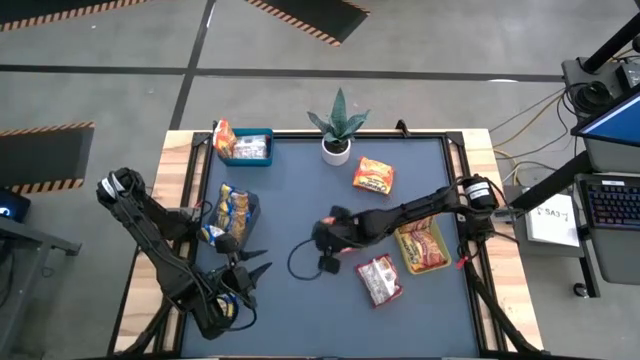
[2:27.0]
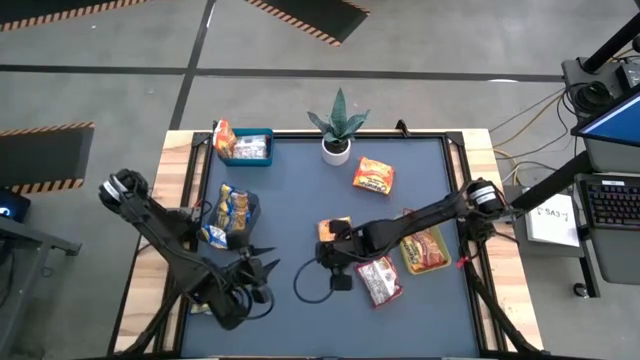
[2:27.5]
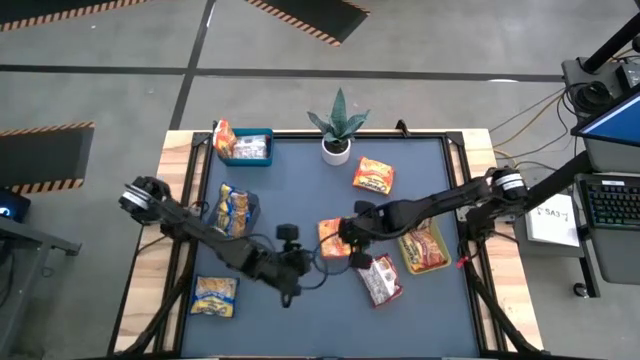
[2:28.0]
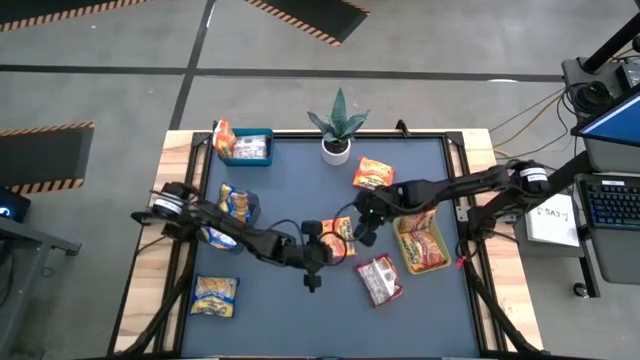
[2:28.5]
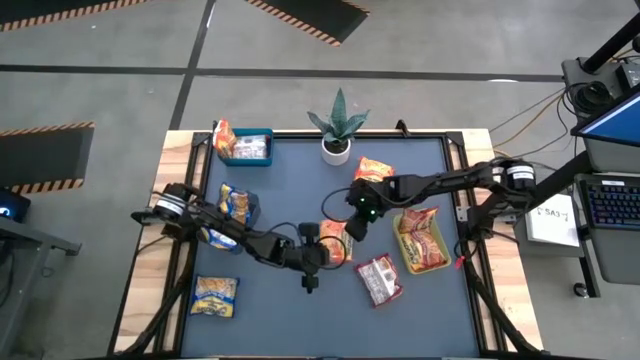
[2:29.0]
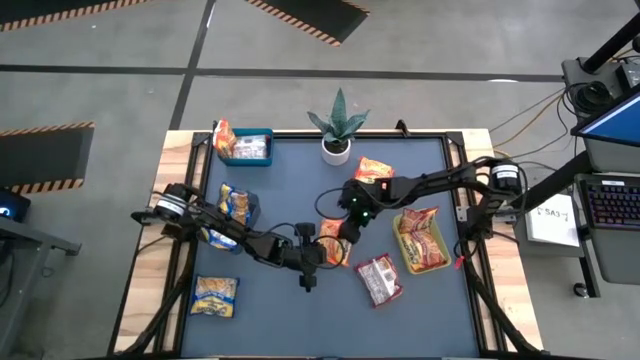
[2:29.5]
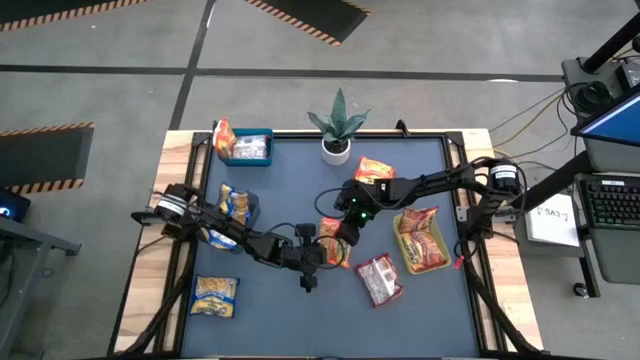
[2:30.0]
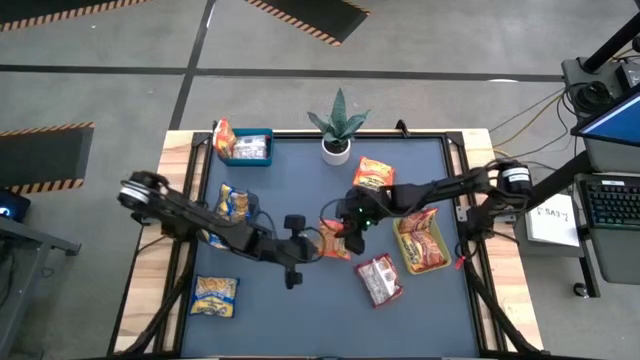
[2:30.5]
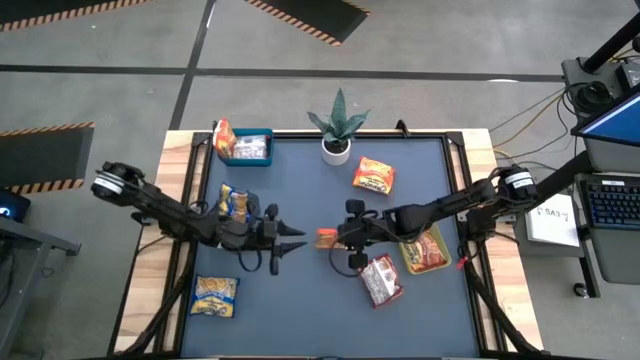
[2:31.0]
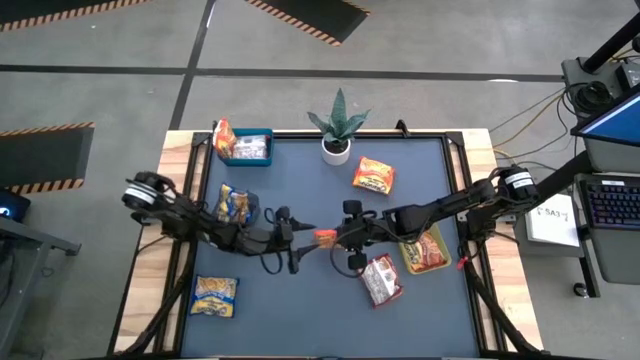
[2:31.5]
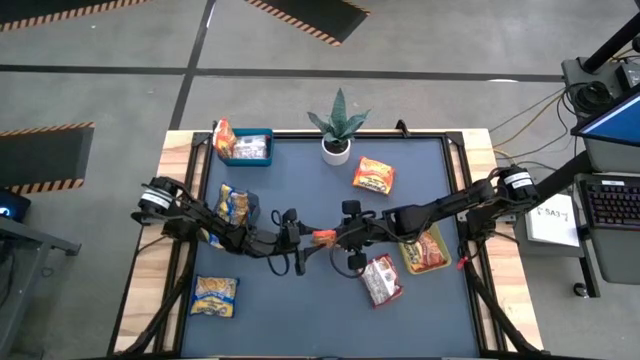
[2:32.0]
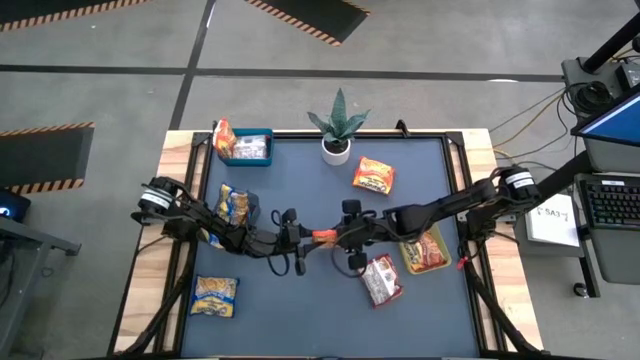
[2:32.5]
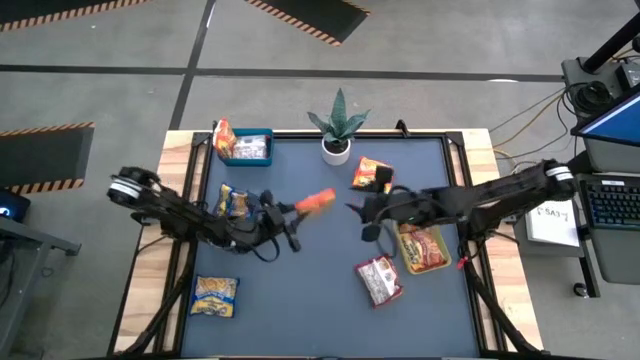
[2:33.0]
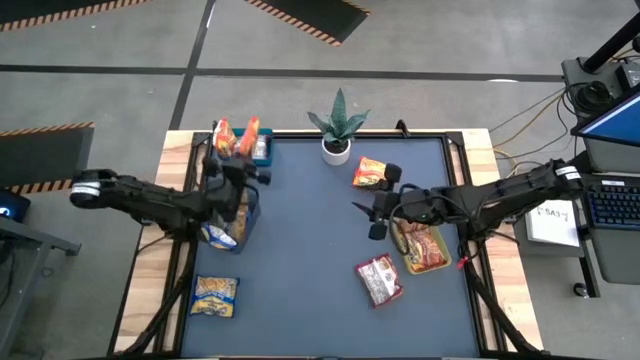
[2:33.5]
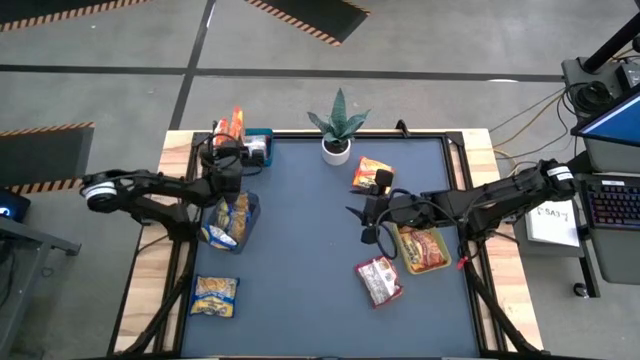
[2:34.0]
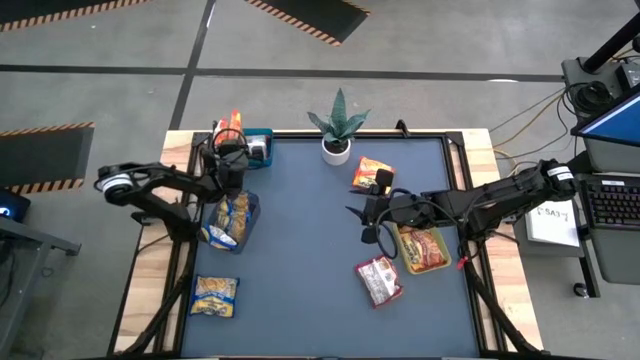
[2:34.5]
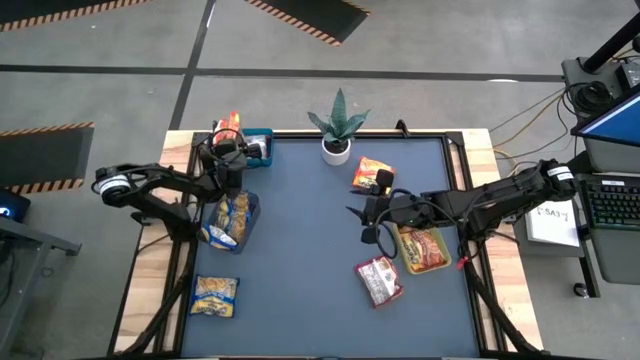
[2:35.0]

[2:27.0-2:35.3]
Task: Sort Maruchan noodles
Put the orange noodle pack into the blue bin

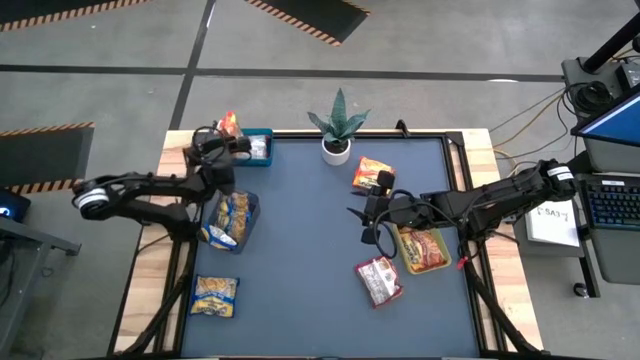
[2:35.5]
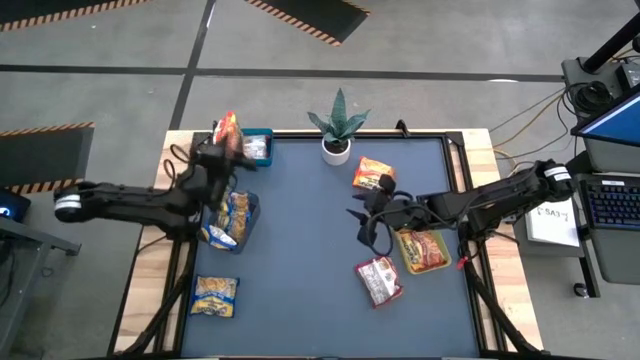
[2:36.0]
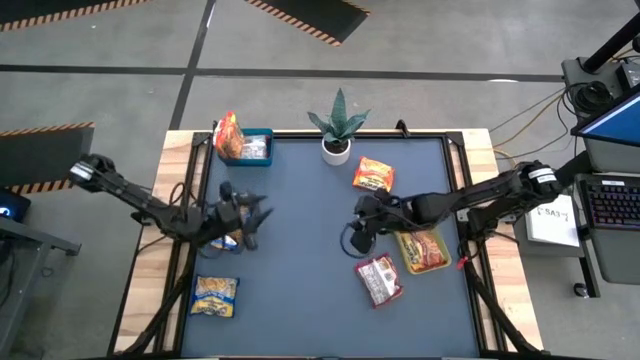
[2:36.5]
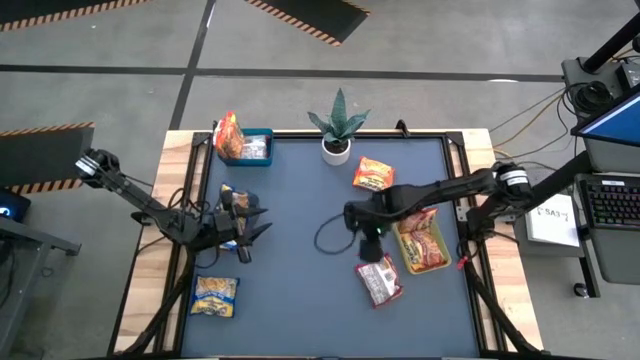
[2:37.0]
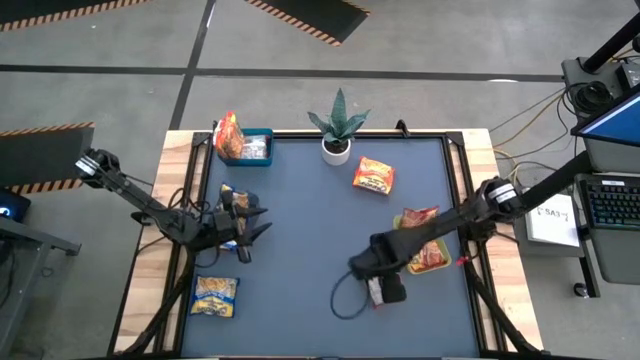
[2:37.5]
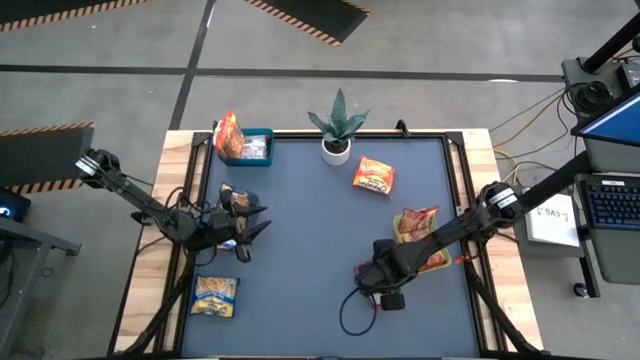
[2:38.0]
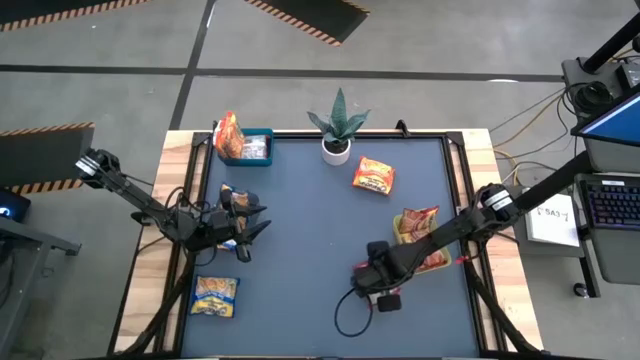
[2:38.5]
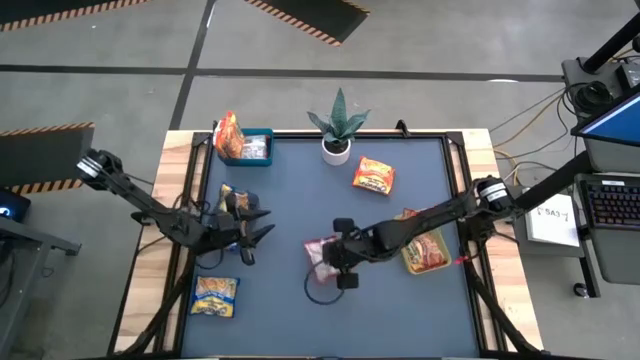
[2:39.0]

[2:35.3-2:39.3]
Put the red noodle pack into the yellow bin

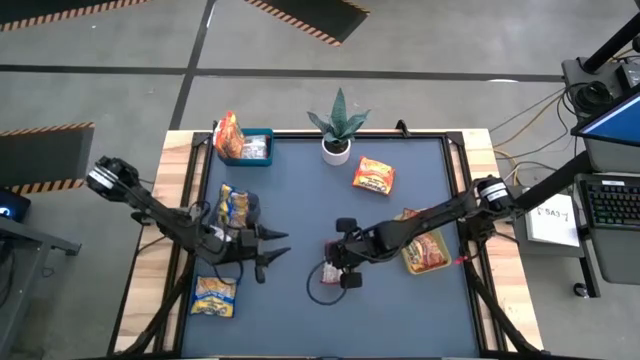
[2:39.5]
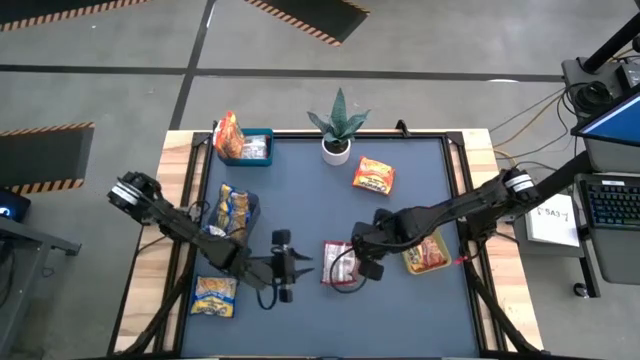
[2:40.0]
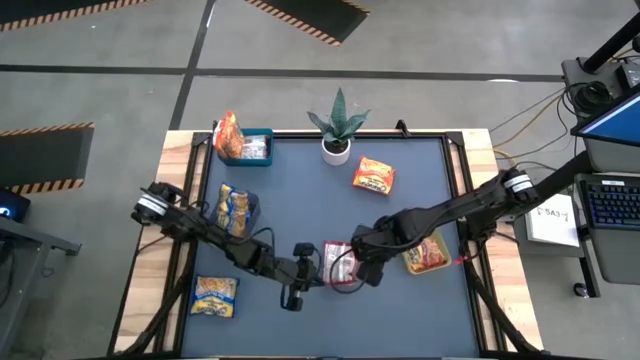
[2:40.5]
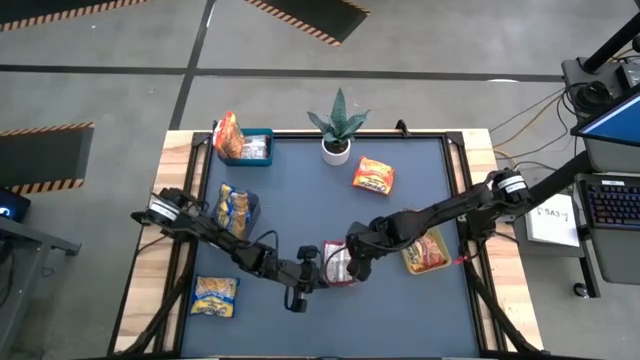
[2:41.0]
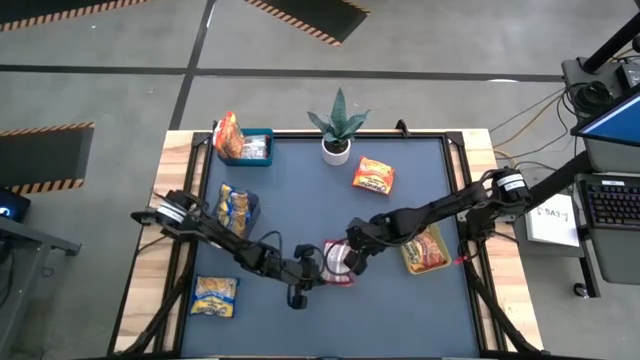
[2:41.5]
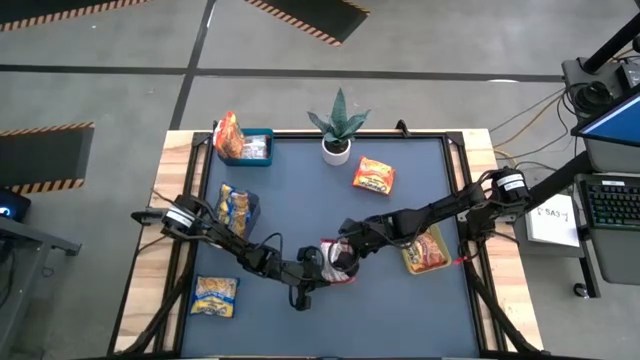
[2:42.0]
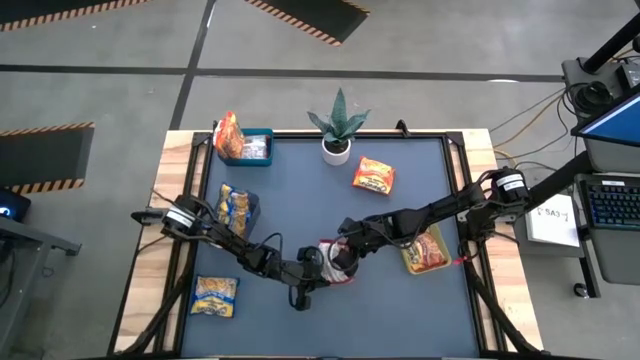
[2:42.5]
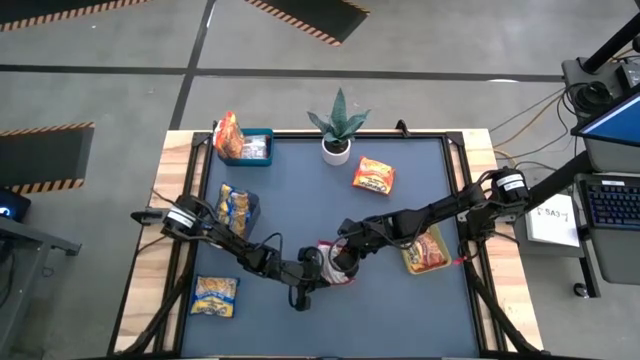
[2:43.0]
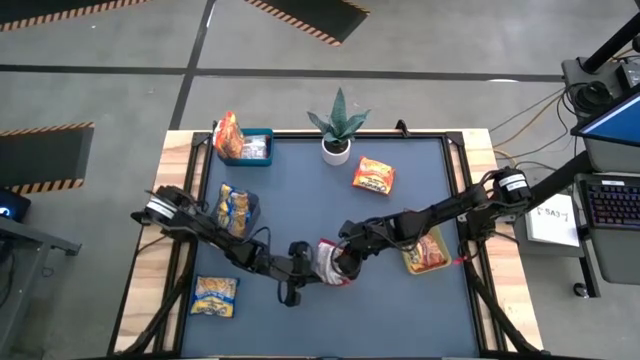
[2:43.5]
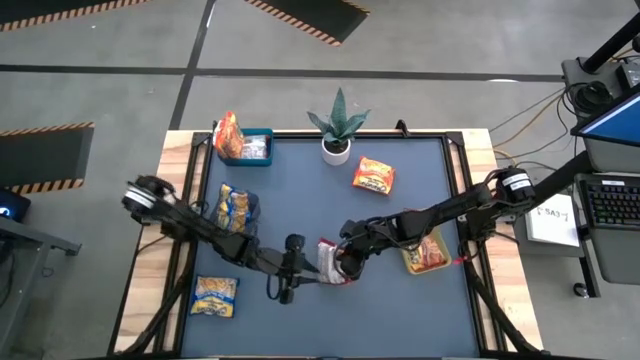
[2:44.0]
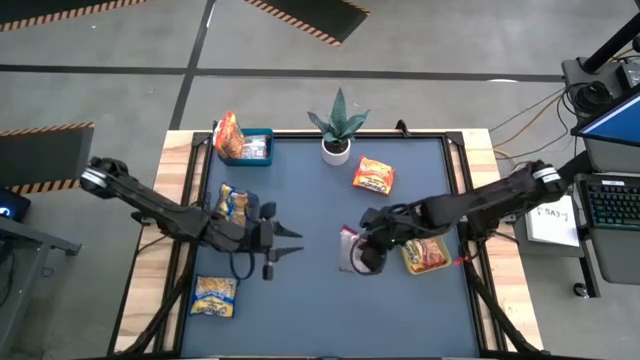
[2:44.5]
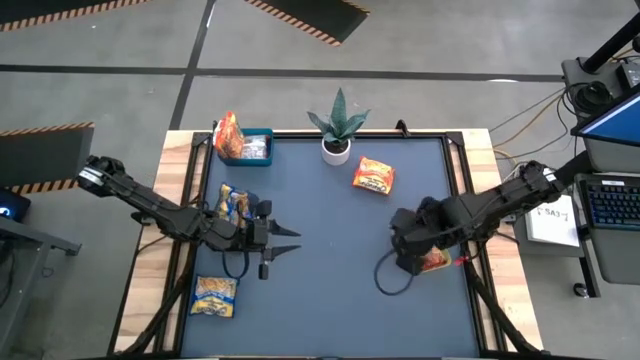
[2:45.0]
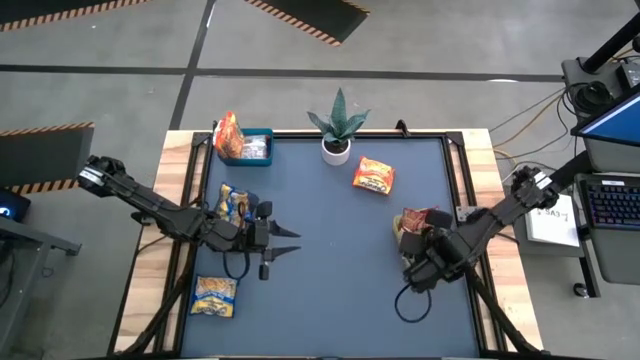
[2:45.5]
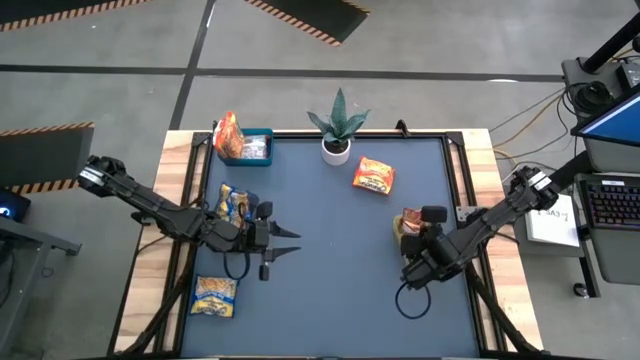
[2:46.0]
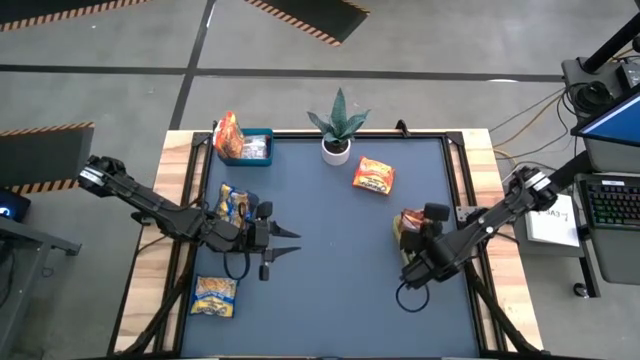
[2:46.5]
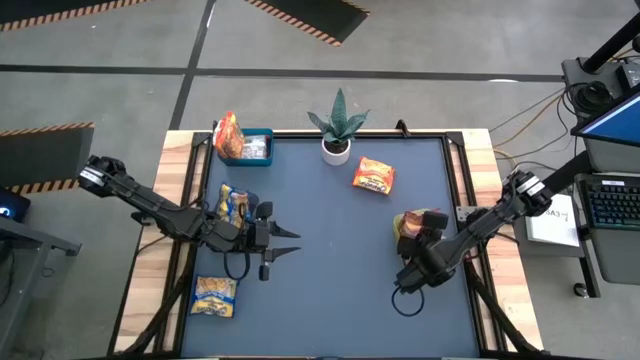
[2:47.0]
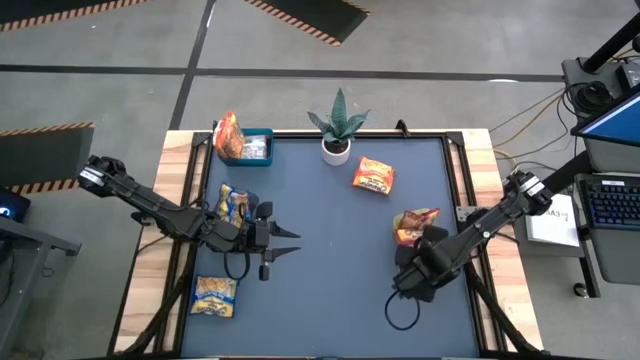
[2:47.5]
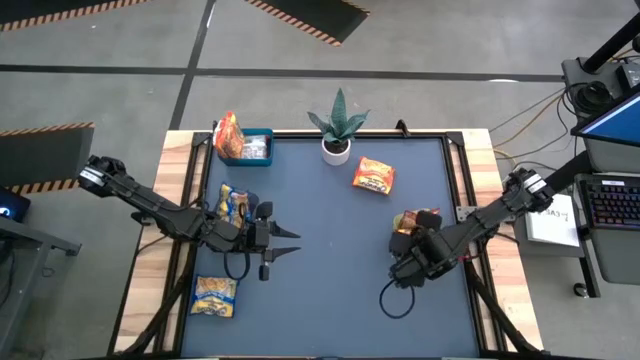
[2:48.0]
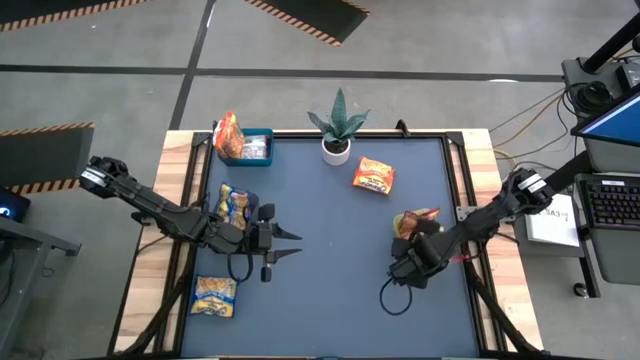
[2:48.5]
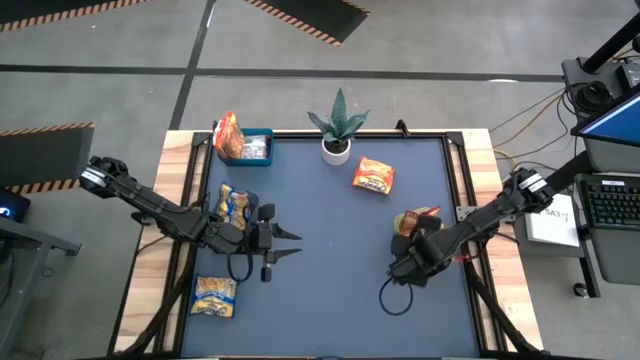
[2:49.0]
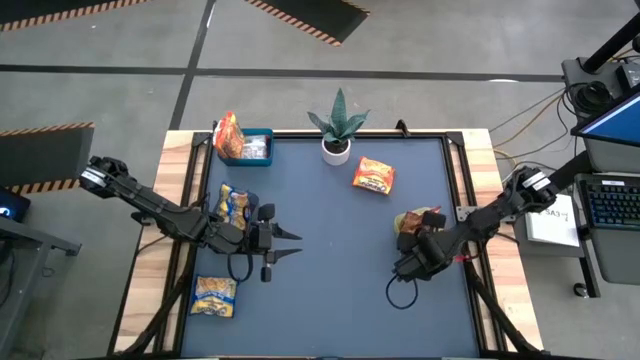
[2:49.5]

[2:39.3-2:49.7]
Put the red noodle pack into the yellow bin
